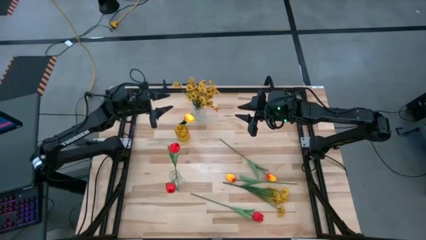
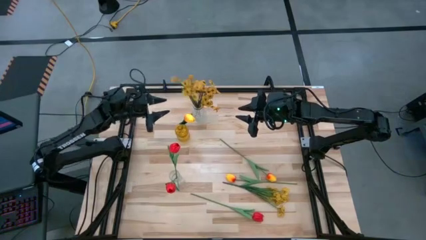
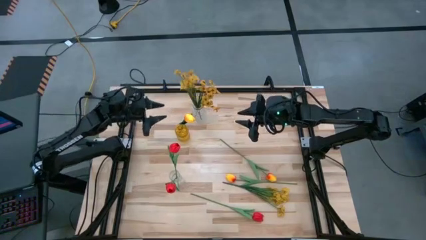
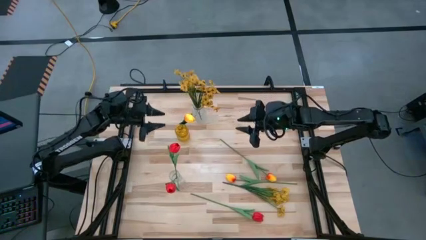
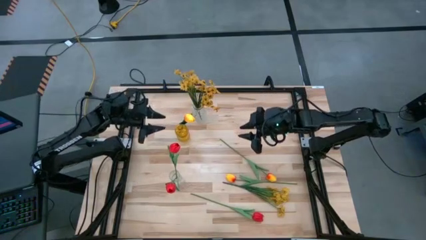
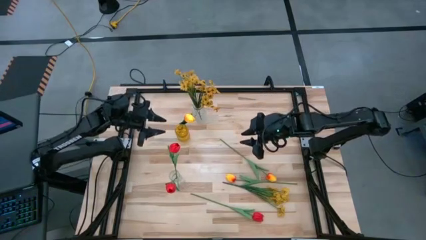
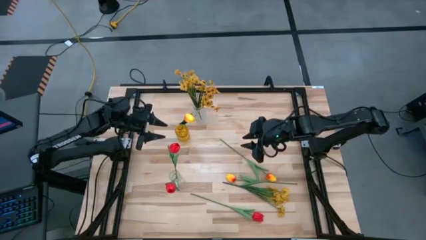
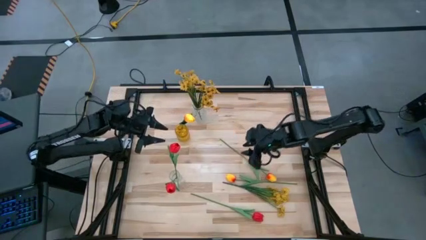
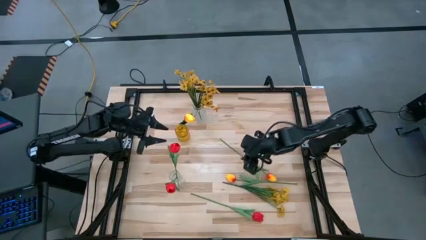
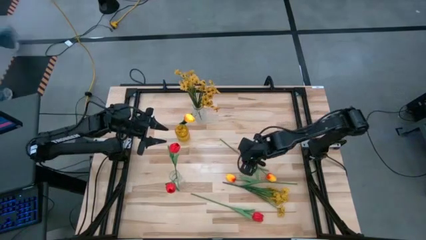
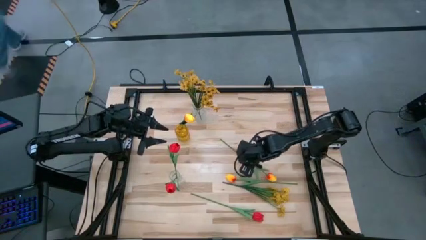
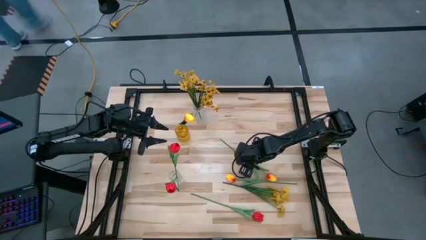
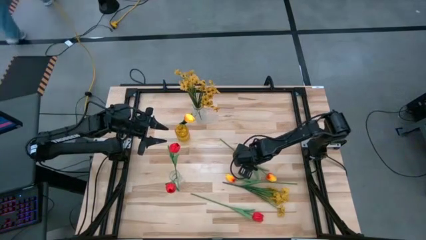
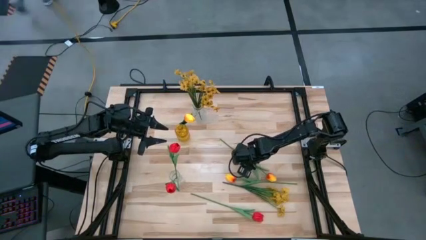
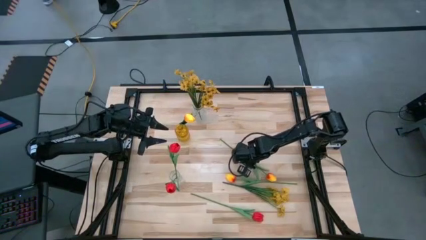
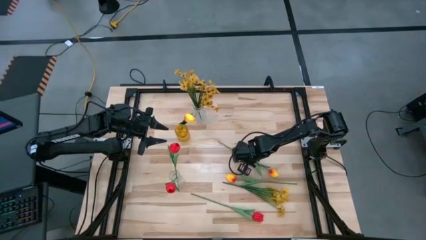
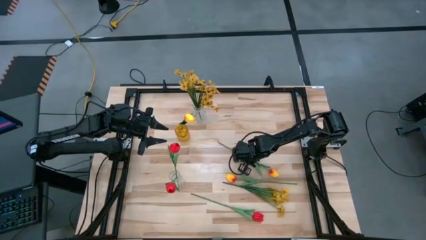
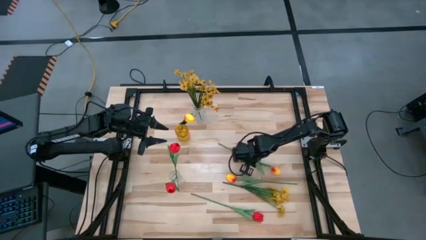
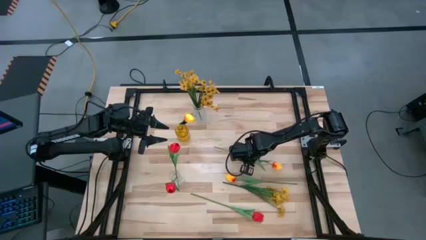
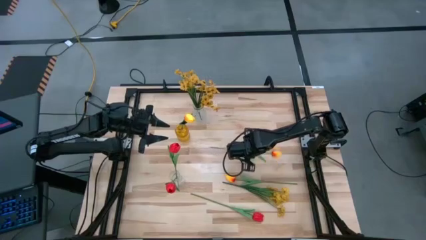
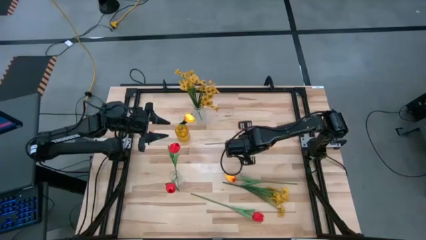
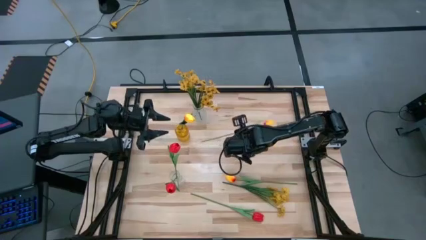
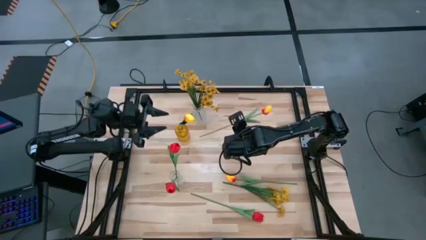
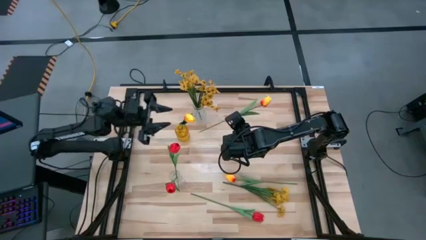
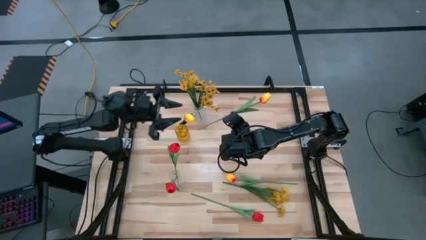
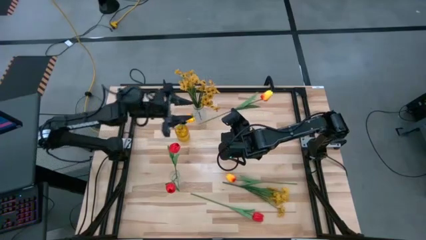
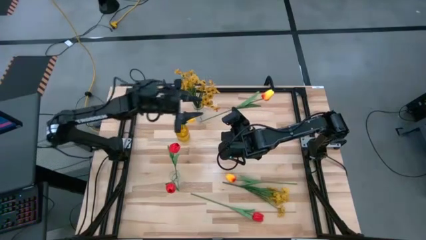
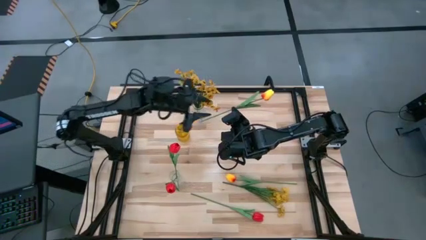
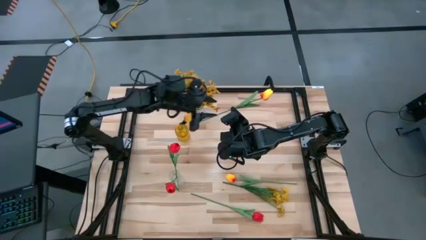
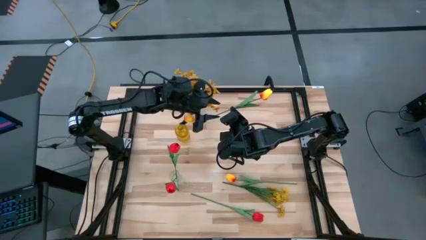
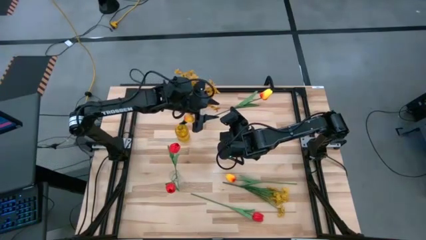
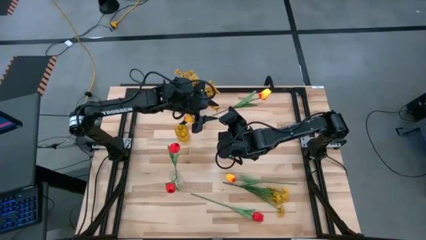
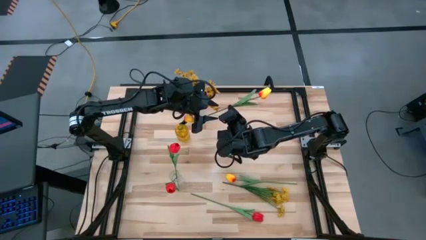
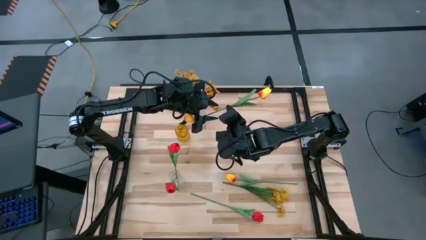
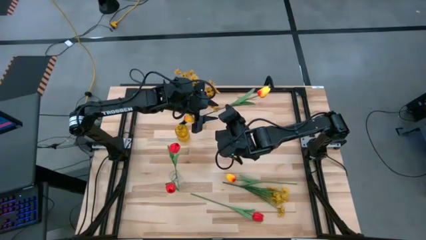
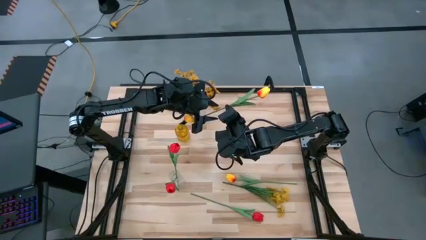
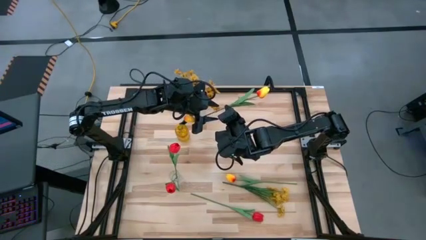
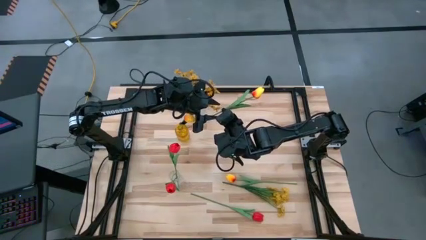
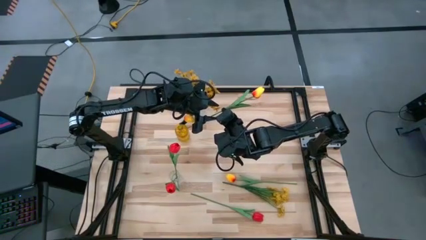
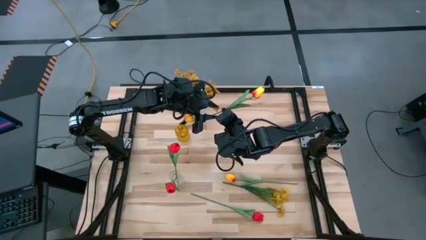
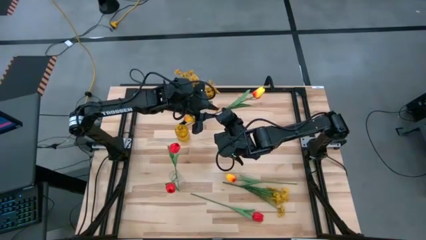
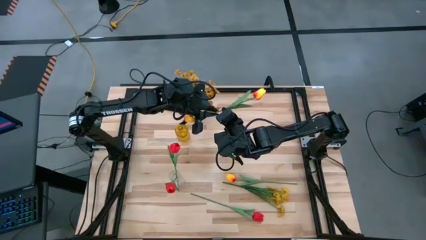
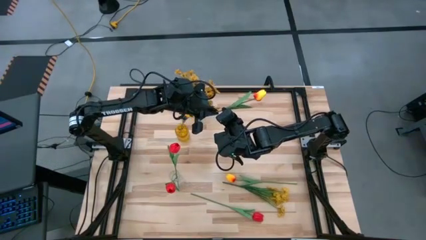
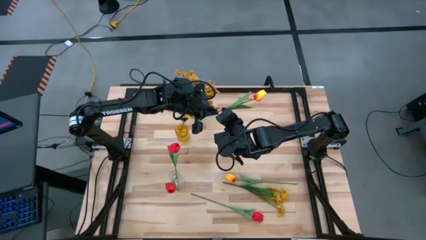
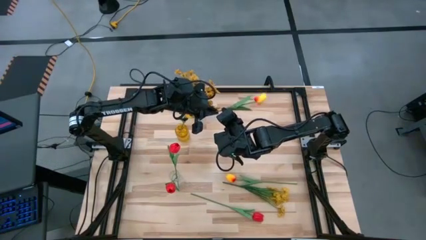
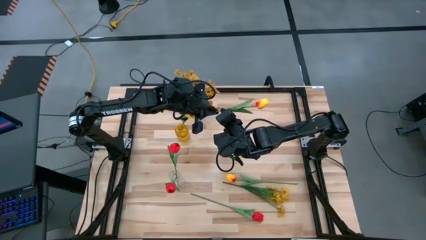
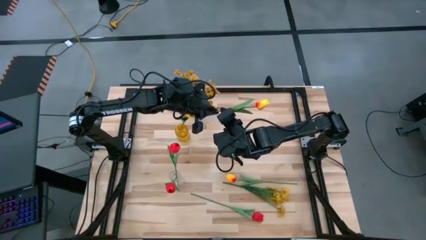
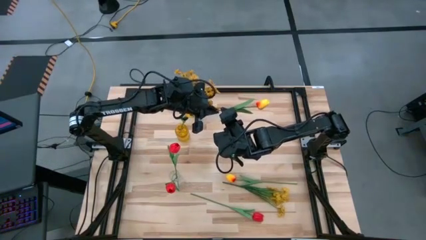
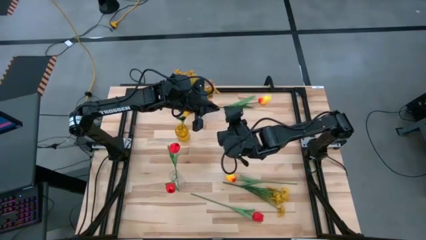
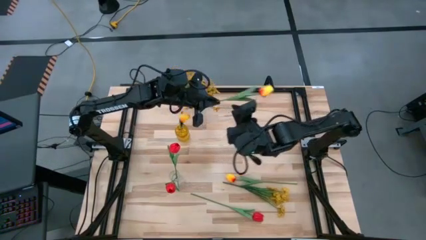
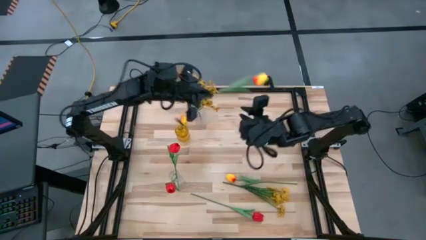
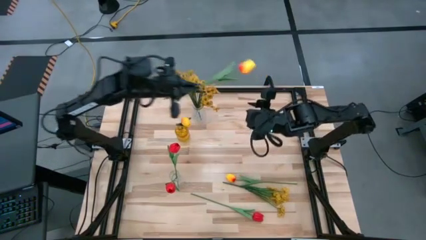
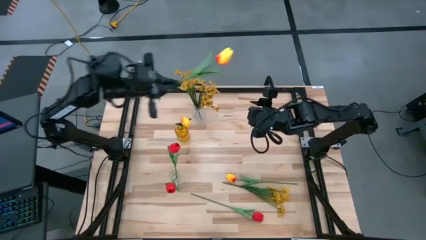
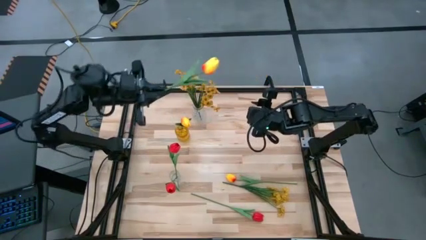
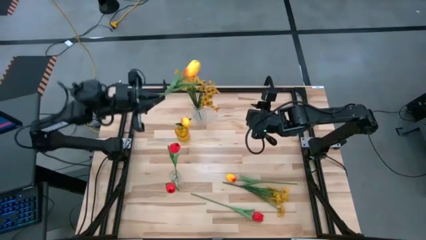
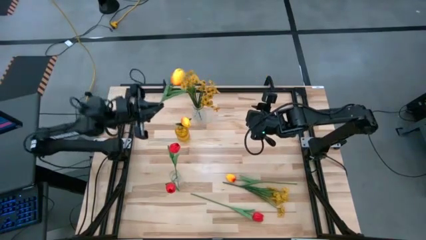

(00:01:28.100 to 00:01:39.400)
Task: Sort flowers into vase by color
Put the top yellow tulip into the yellow vase

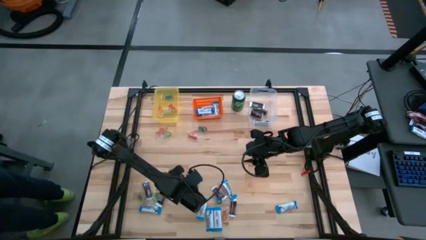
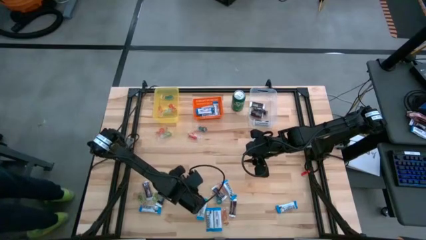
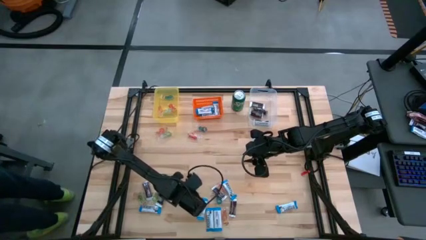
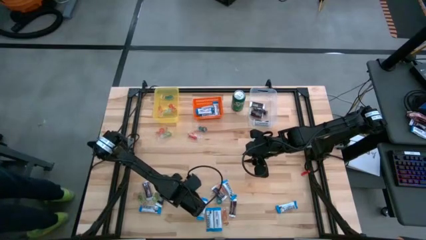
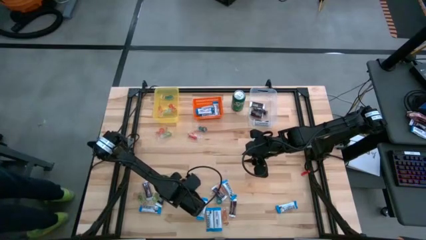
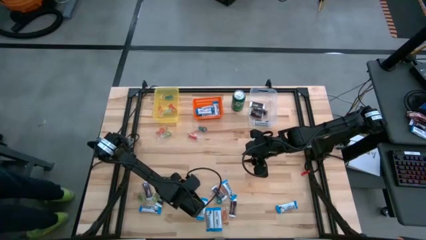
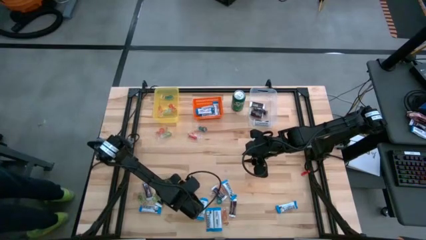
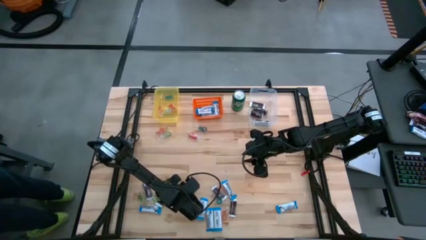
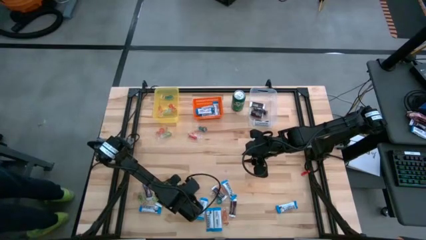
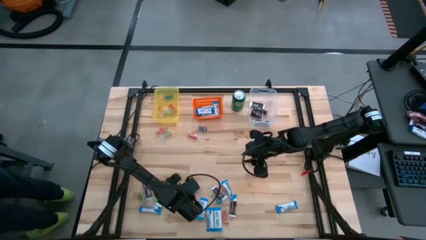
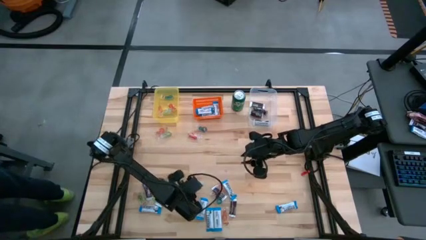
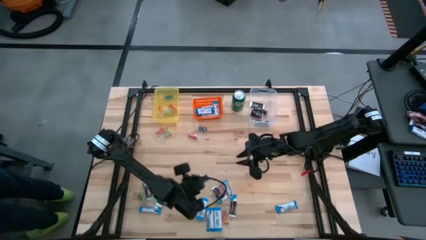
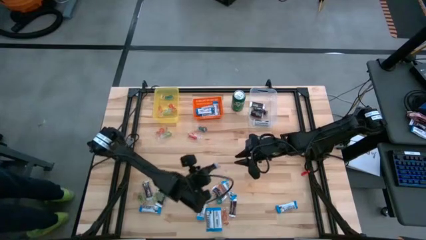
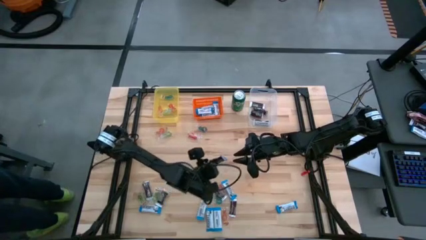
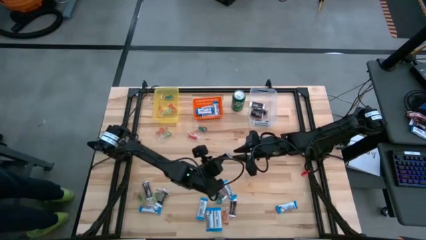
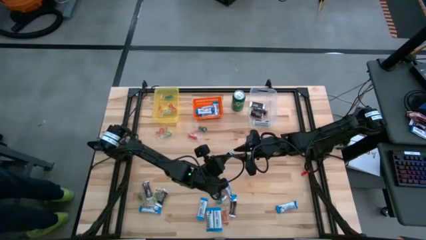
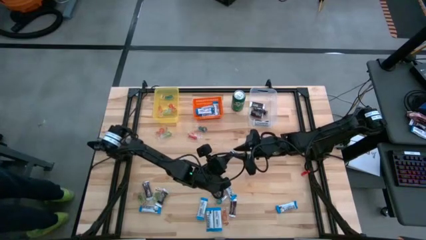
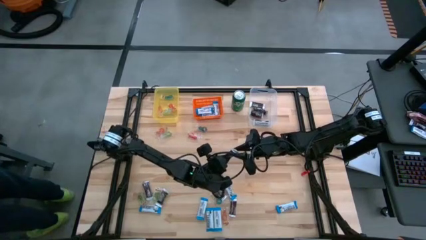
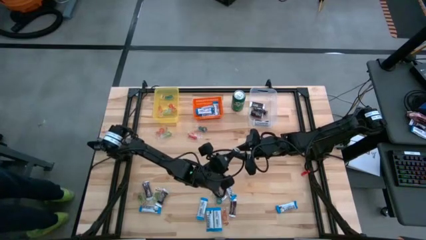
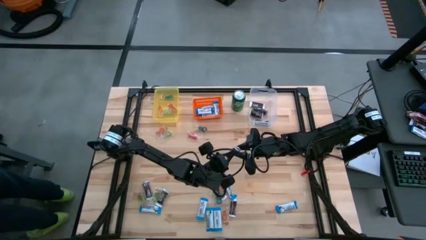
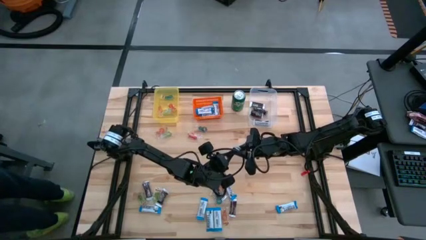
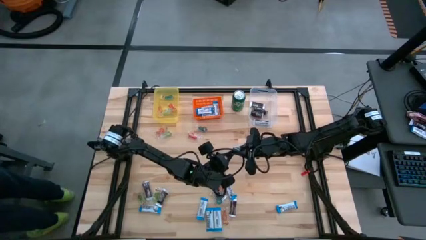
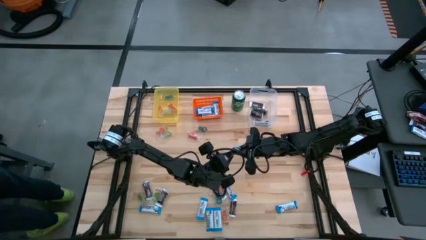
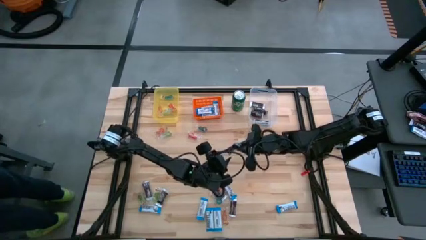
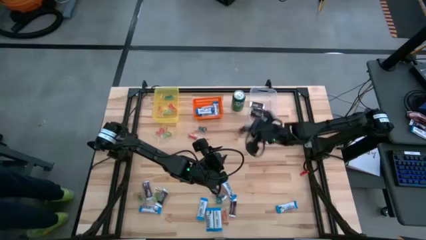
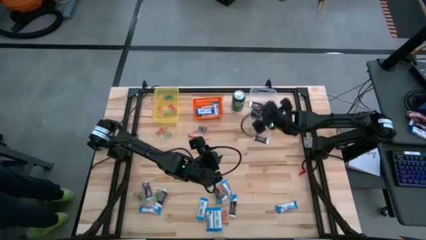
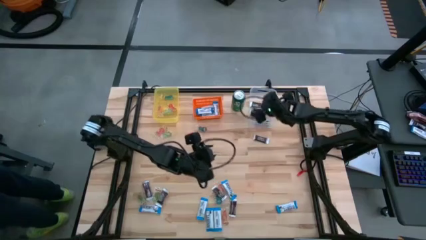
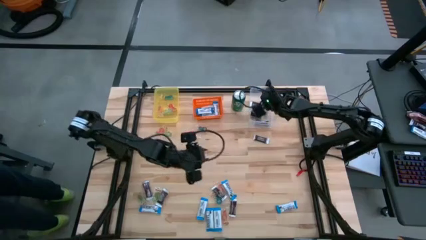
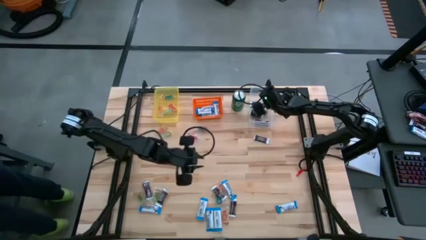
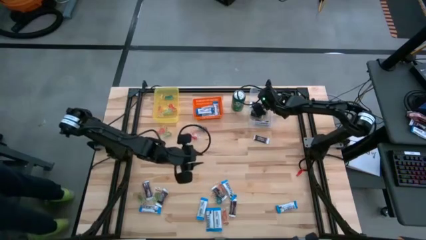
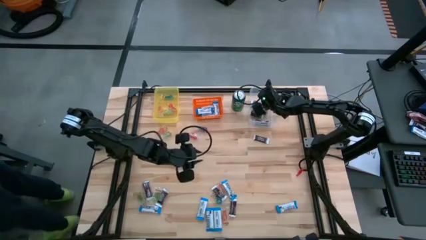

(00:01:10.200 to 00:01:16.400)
Task: Organize candy in baskets
Put the brown chocolate into the transparent bin
